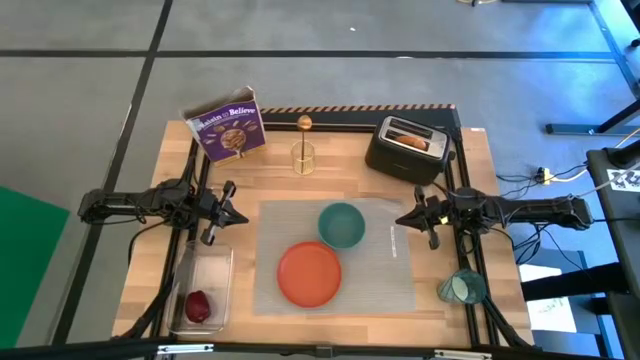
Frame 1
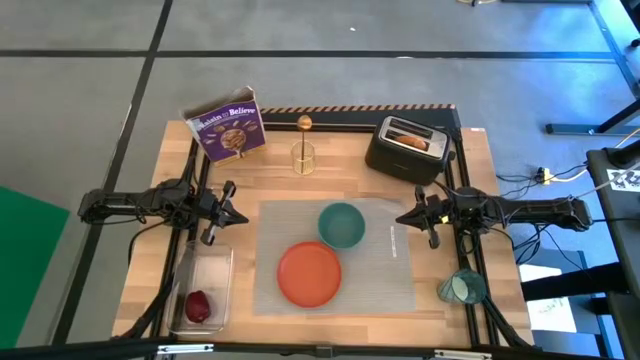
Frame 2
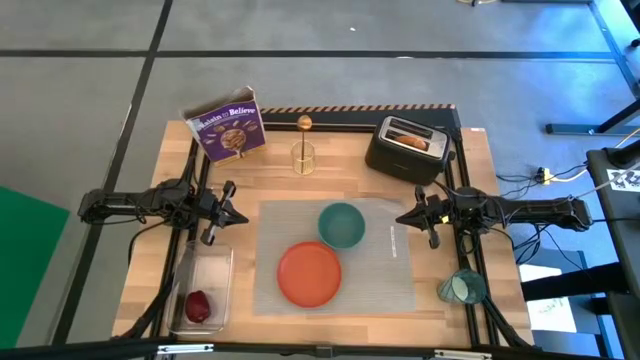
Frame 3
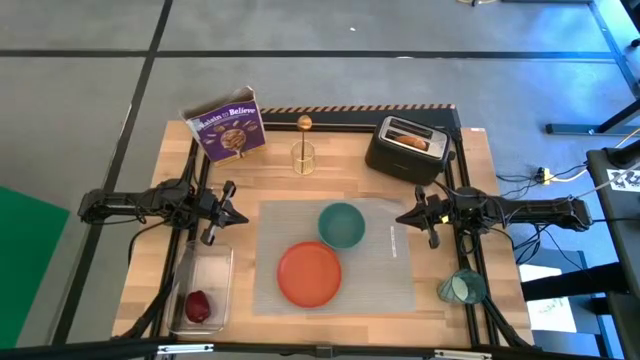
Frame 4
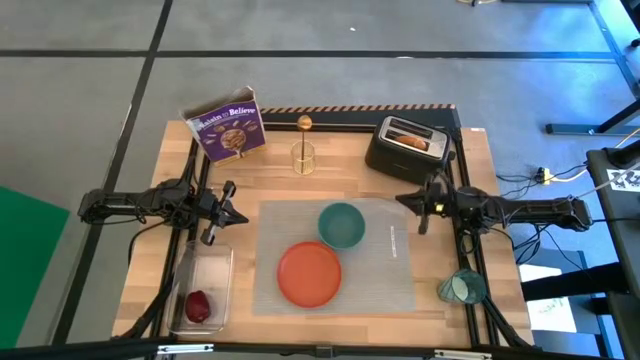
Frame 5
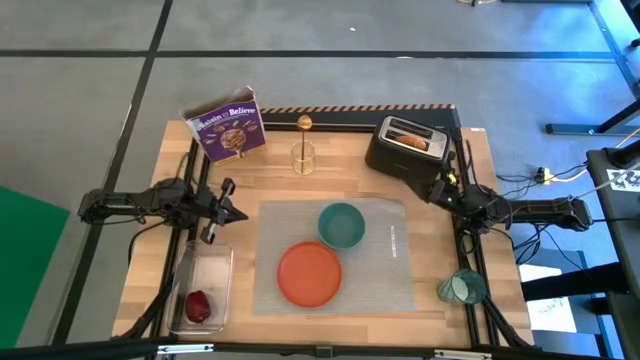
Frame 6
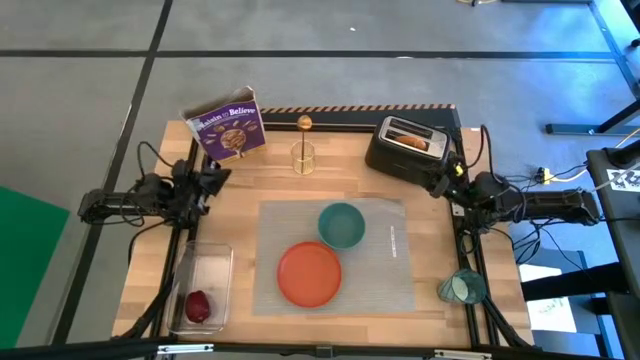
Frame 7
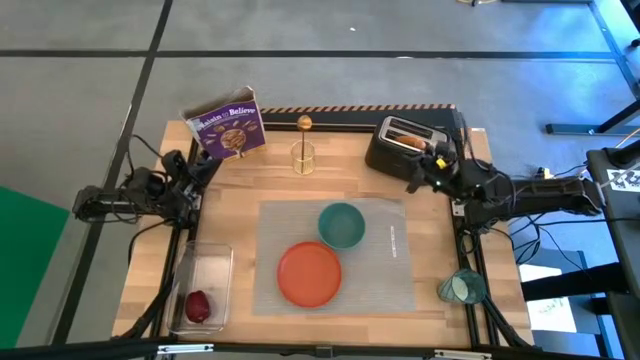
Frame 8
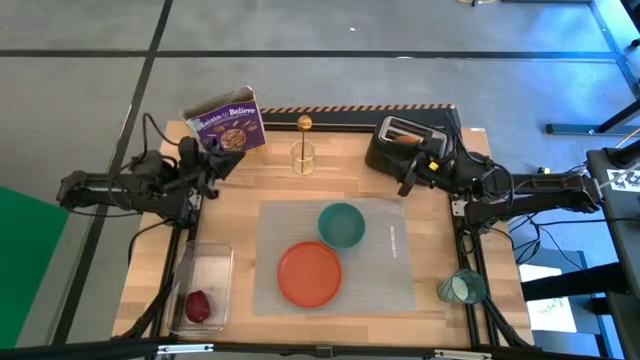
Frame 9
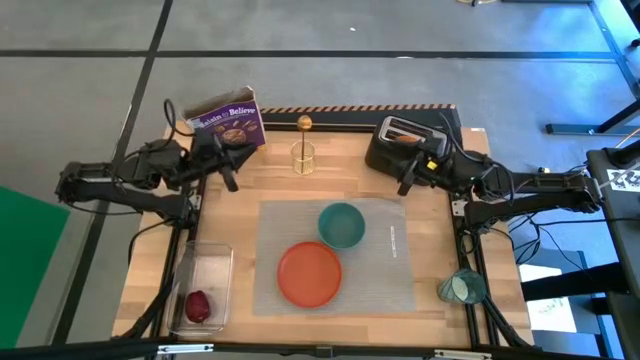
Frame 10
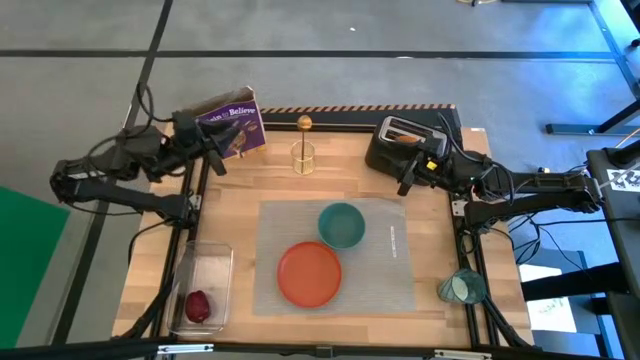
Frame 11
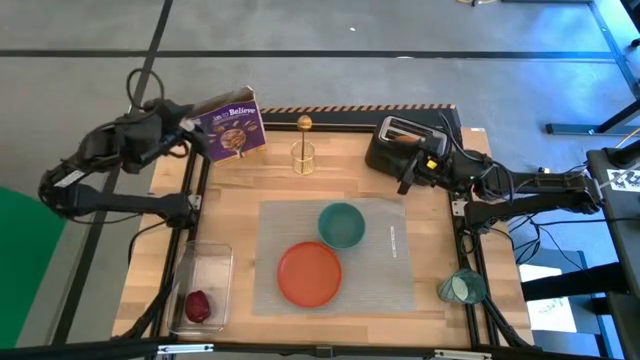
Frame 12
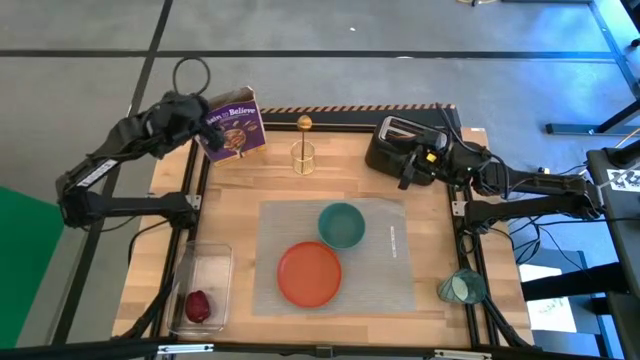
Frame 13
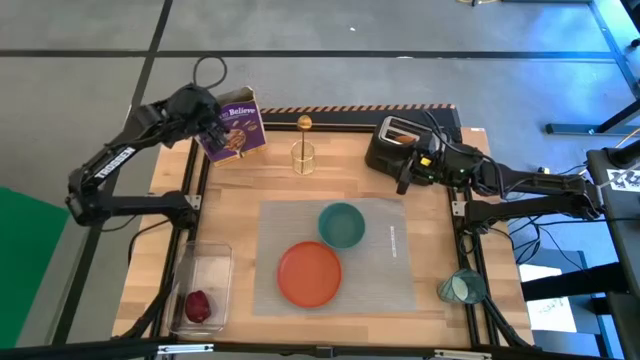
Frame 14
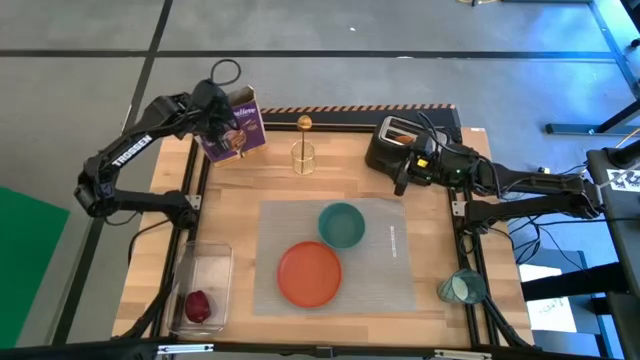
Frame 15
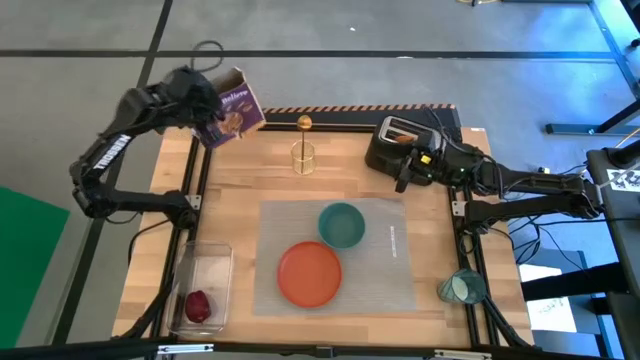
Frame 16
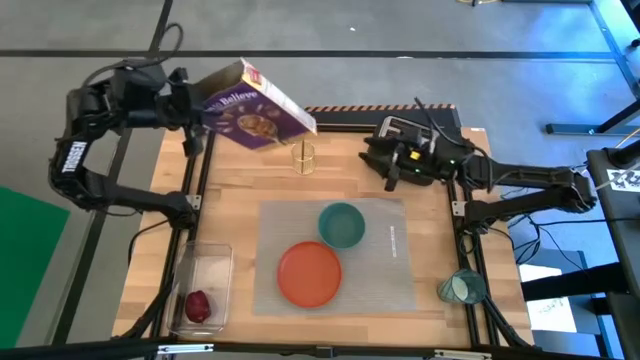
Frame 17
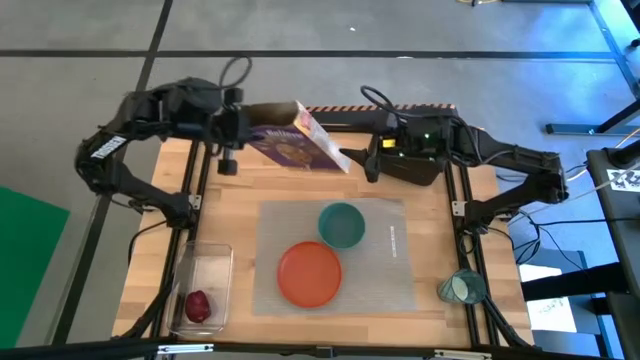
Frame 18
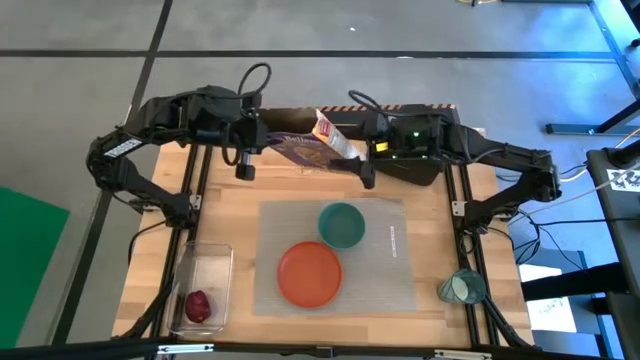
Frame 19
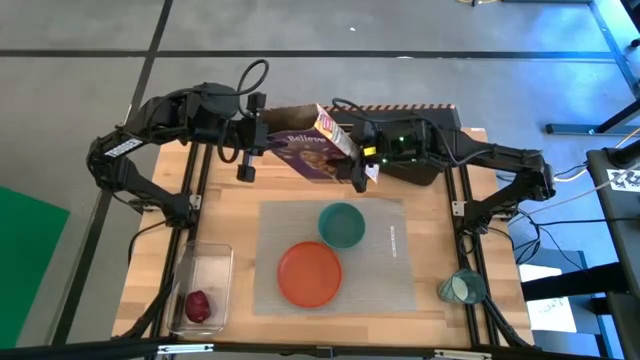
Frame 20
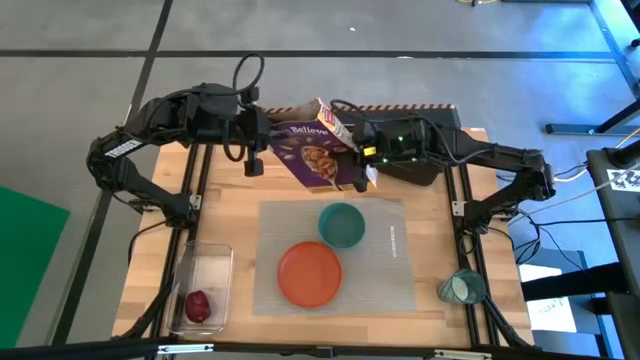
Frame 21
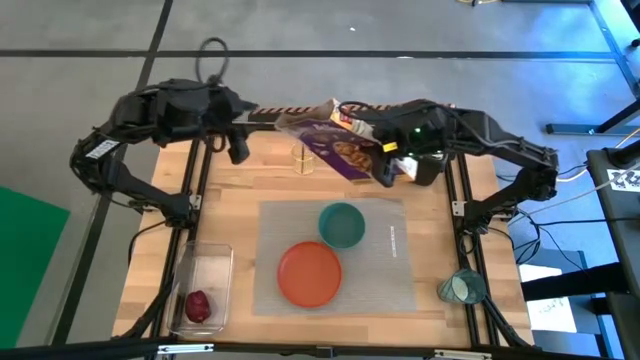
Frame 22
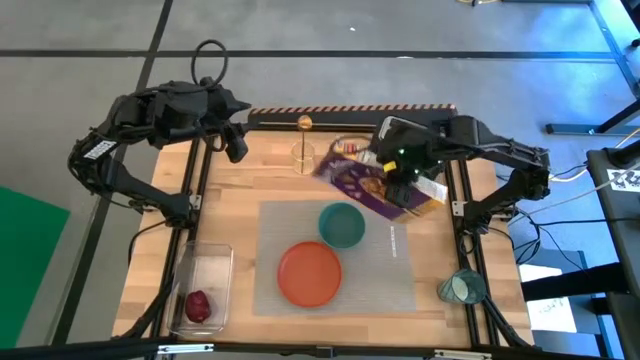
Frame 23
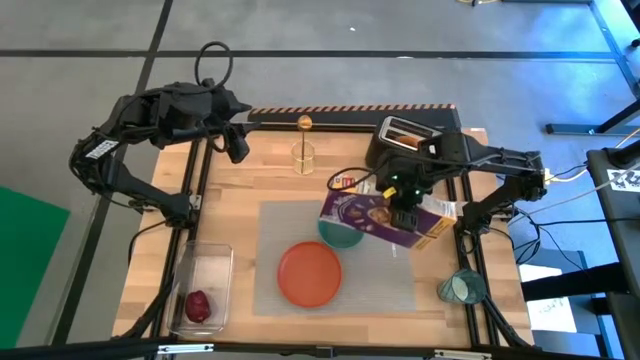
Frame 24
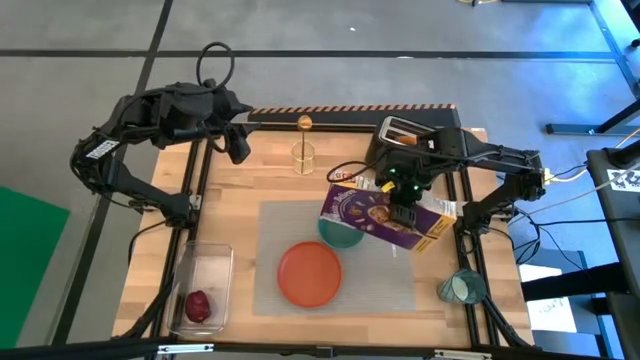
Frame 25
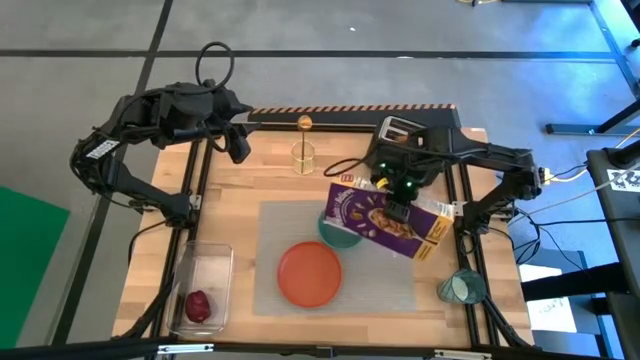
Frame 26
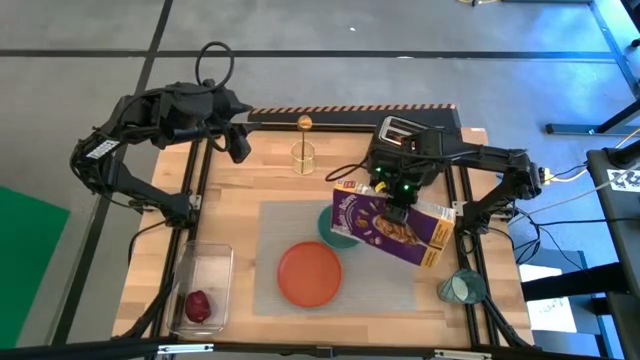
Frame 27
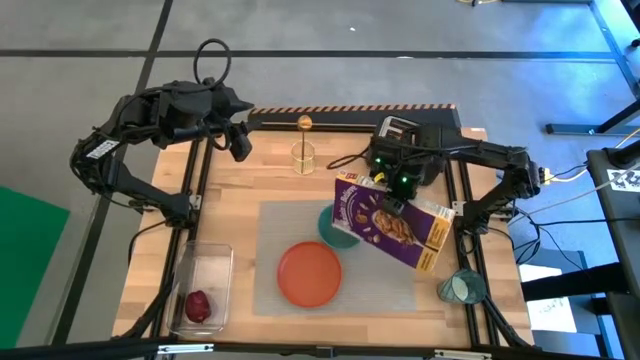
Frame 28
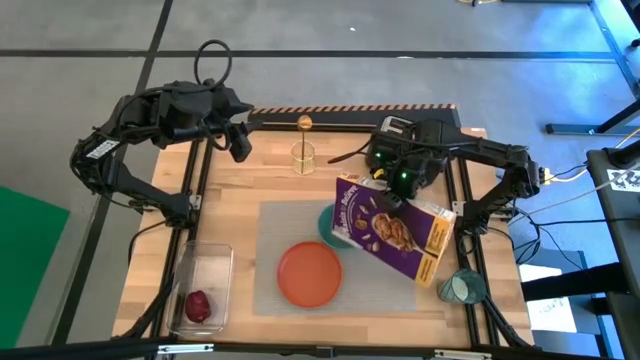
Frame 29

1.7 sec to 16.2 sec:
Task: Arrange a breakfast setting
Pour the cereal into the green bowl

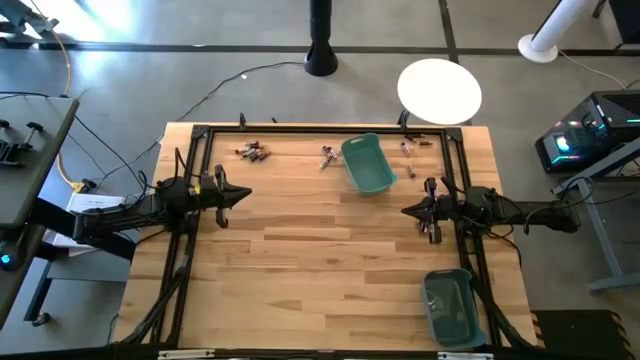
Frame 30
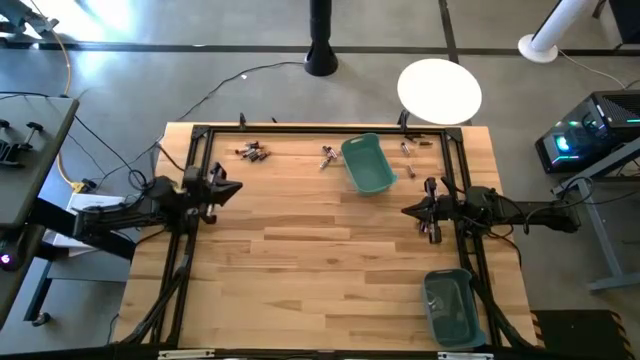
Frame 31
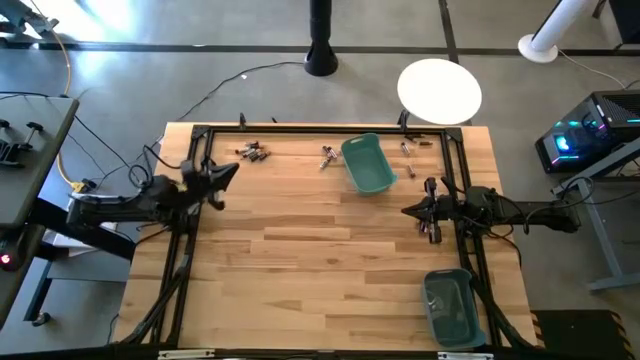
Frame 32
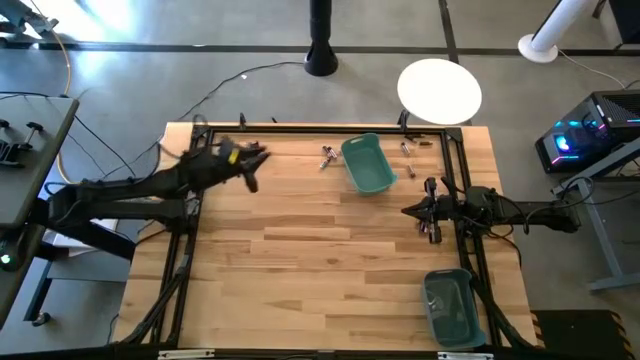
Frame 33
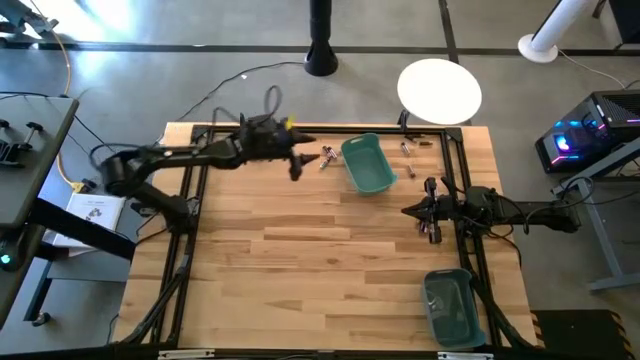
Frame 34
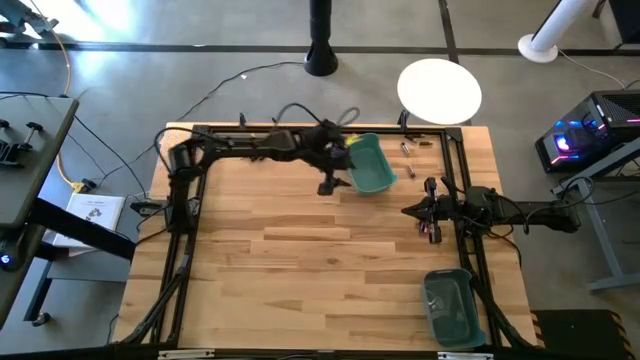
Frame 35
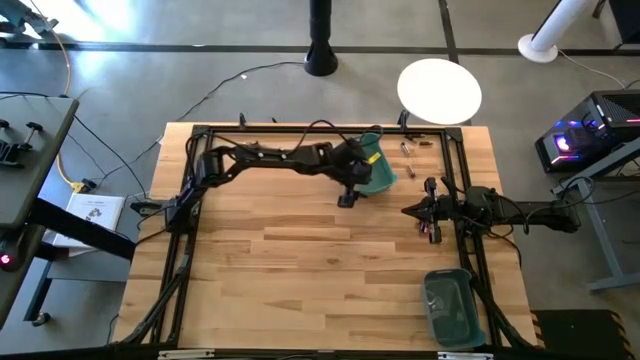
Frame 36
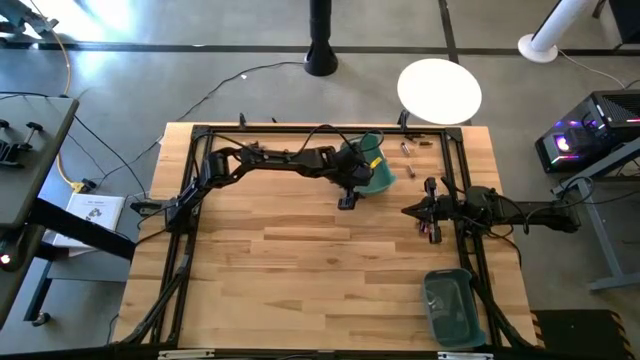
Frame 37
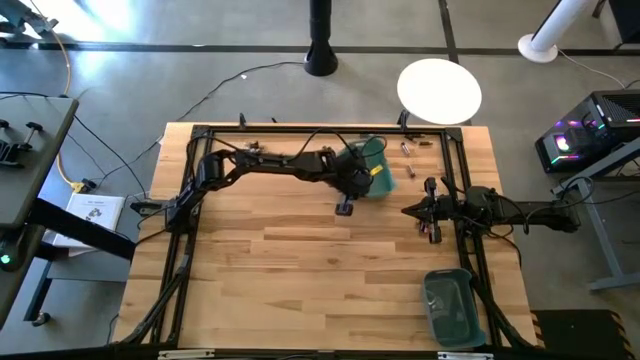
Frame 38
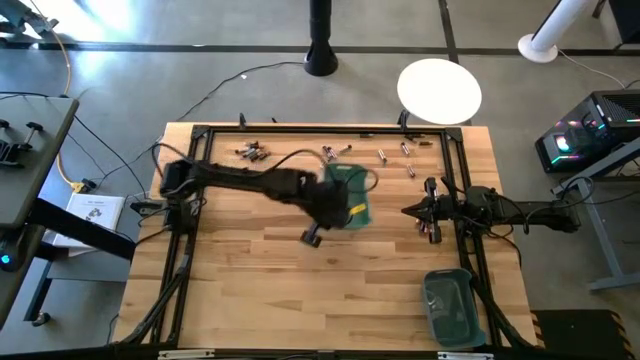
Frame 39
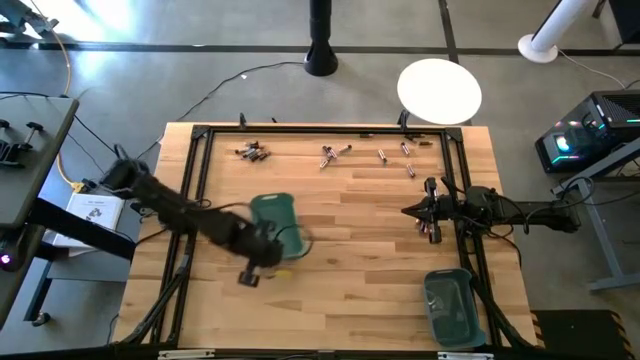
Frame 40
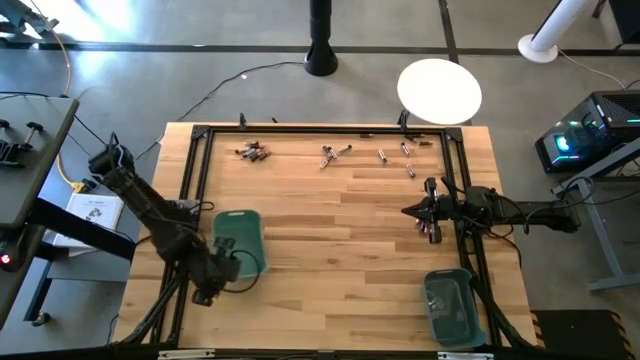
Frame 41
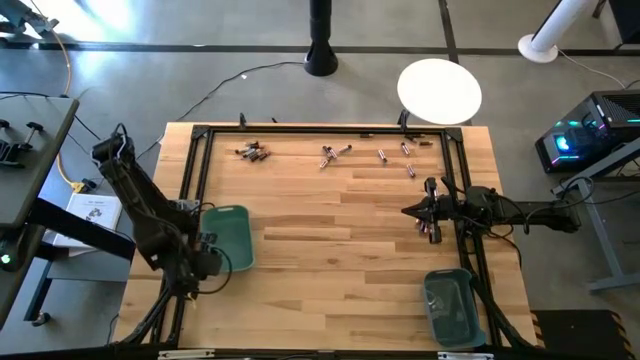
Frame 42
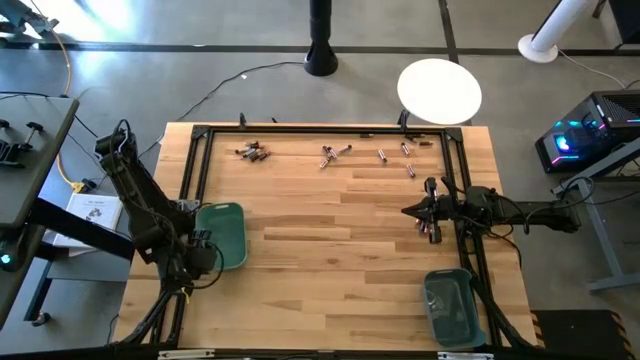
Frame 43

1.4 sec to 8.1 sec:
Task: Sort batteries
Prepare the green bin
